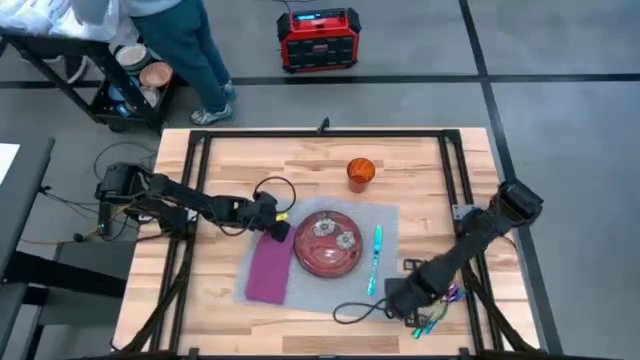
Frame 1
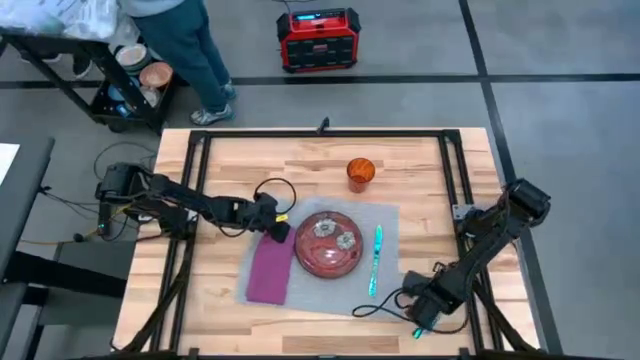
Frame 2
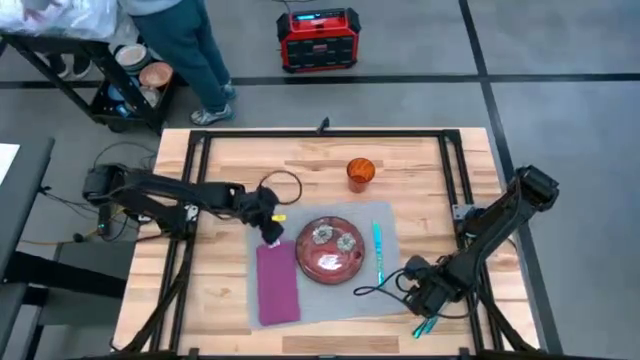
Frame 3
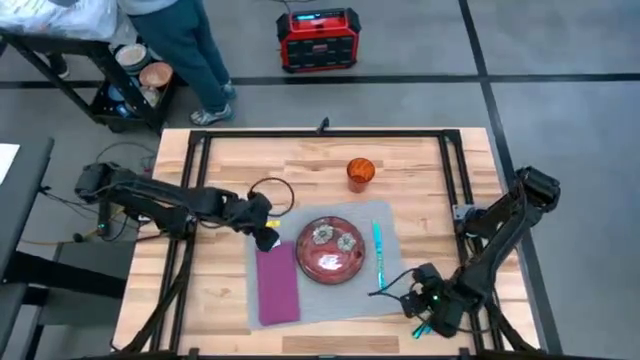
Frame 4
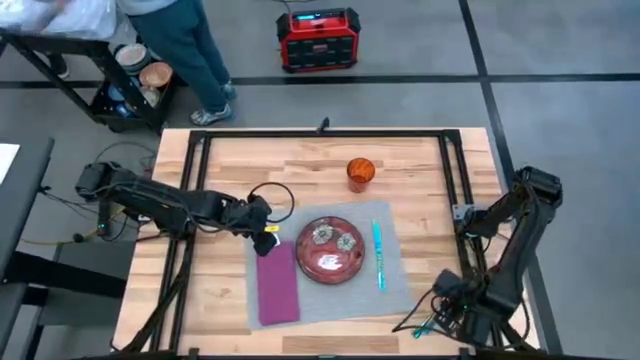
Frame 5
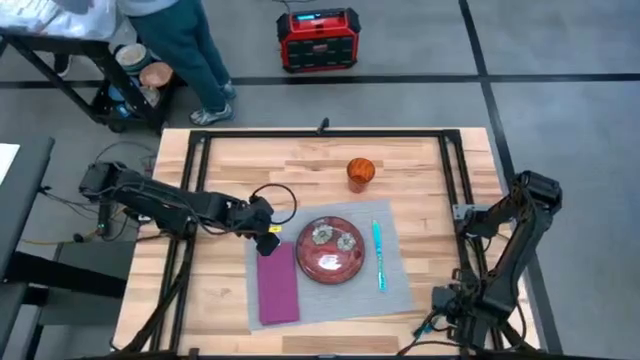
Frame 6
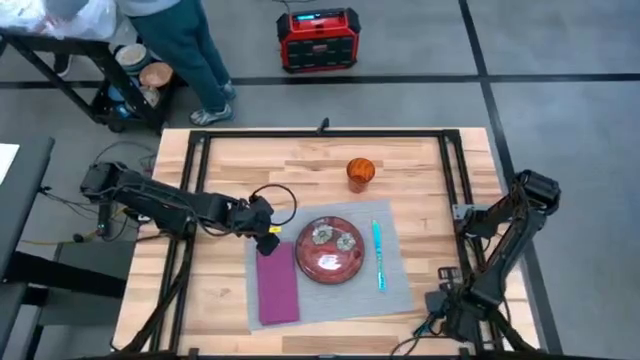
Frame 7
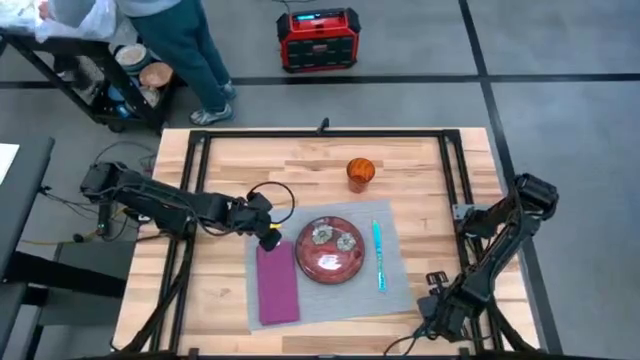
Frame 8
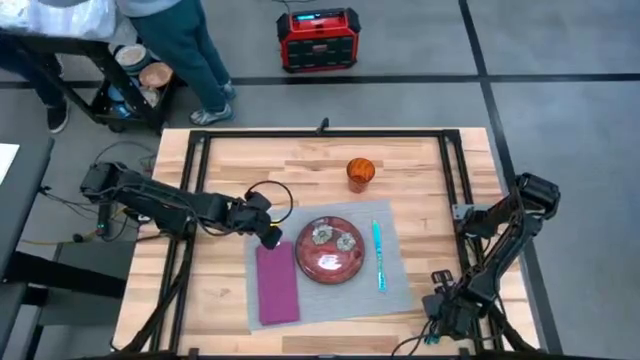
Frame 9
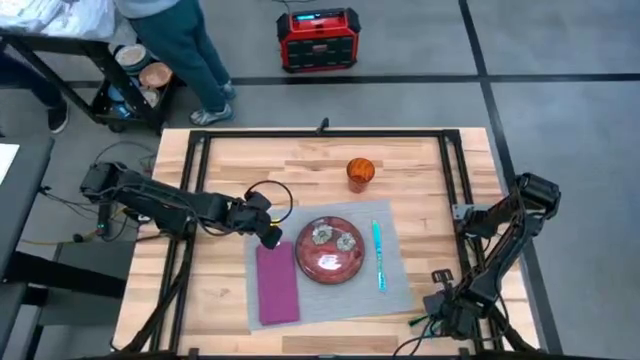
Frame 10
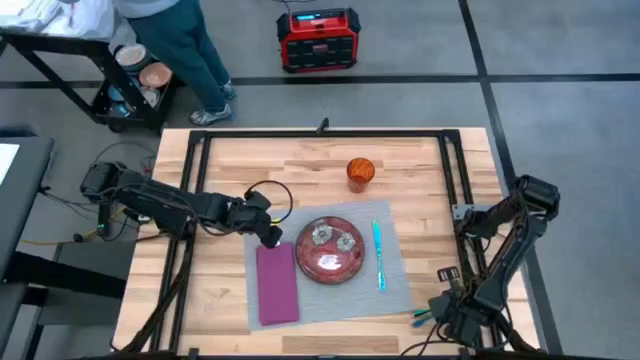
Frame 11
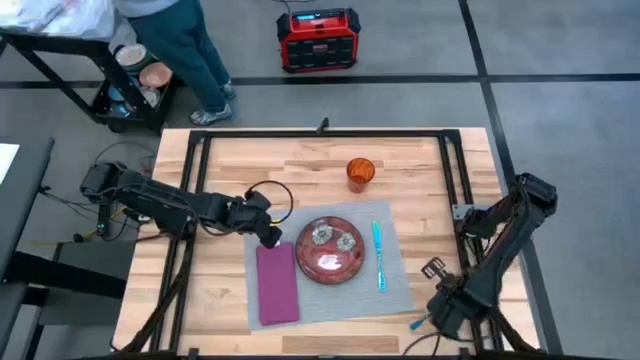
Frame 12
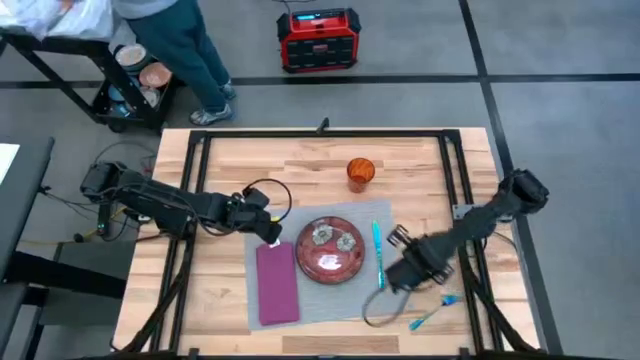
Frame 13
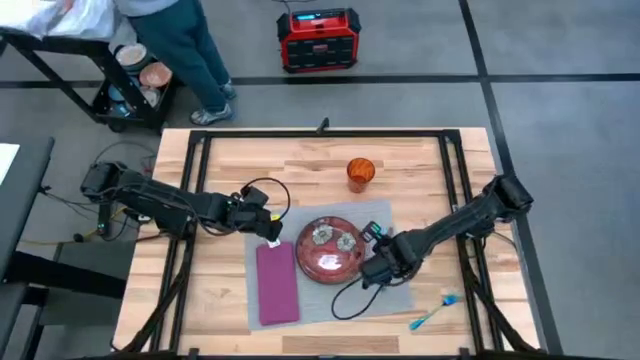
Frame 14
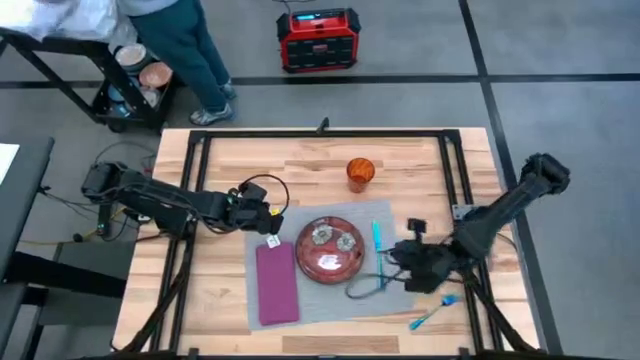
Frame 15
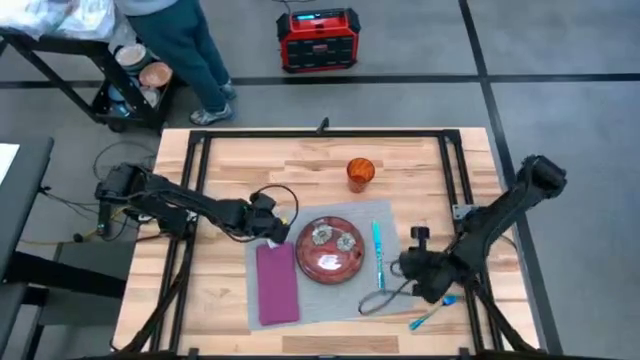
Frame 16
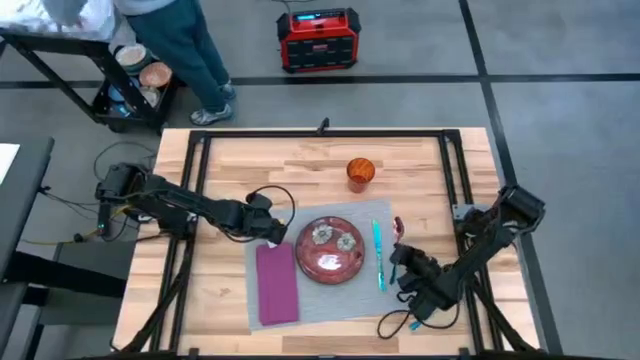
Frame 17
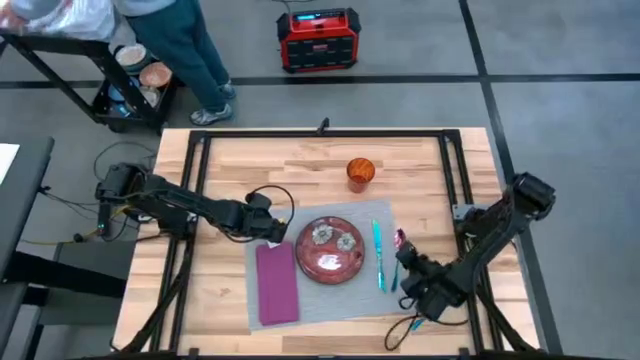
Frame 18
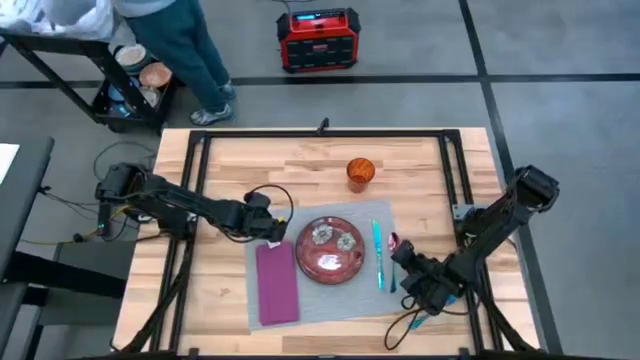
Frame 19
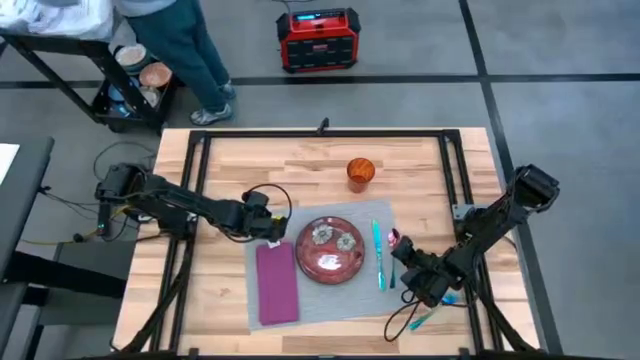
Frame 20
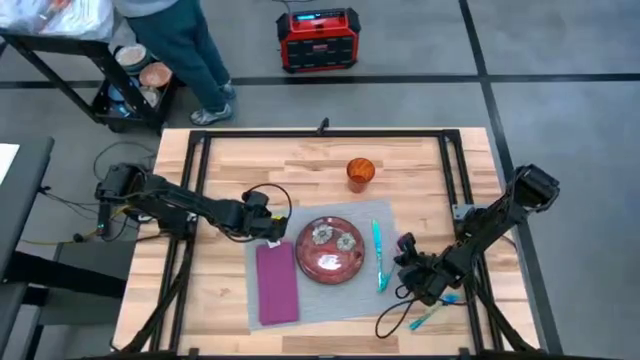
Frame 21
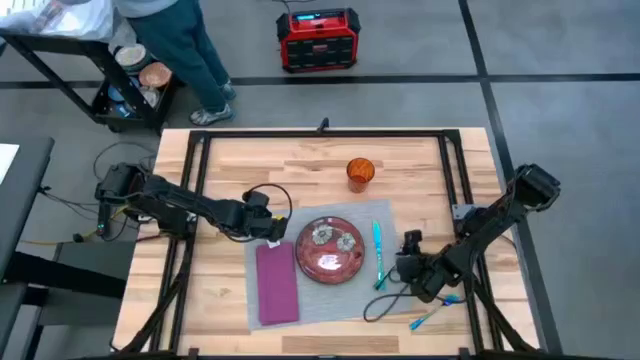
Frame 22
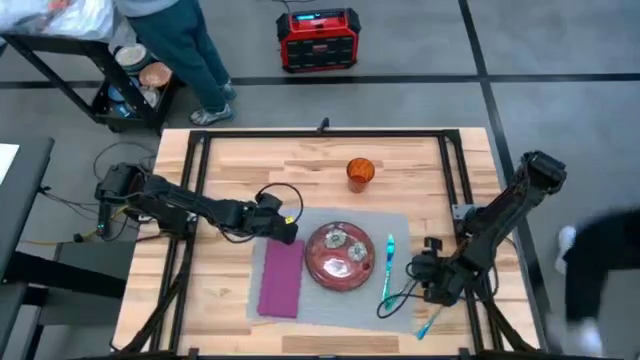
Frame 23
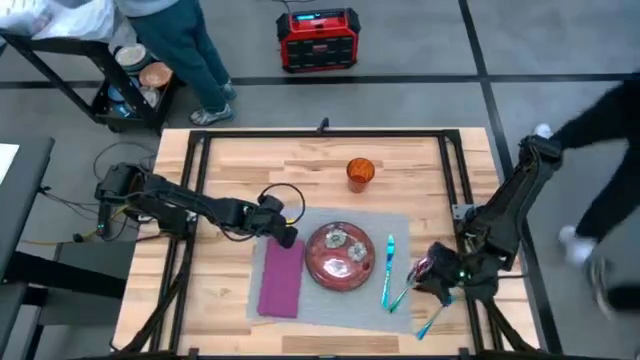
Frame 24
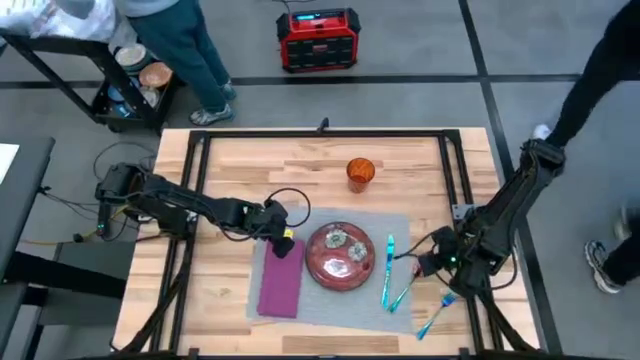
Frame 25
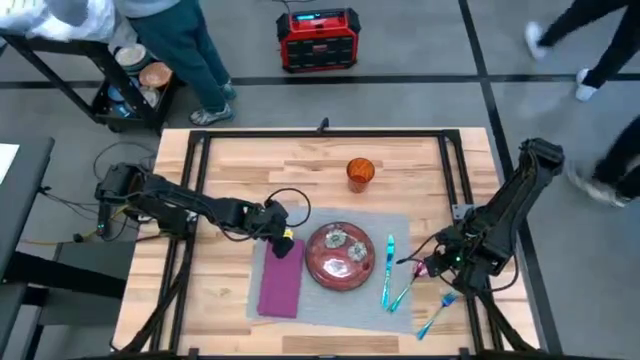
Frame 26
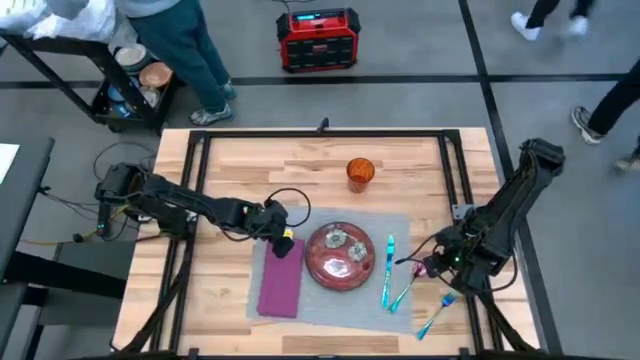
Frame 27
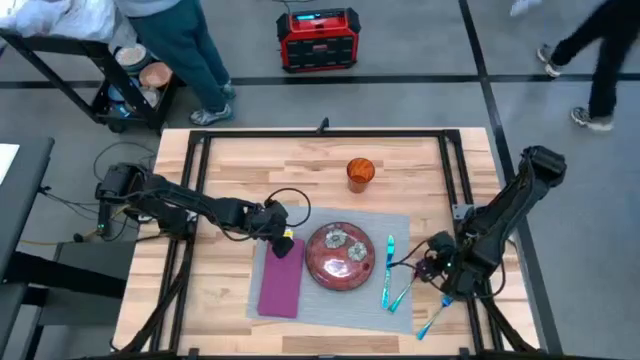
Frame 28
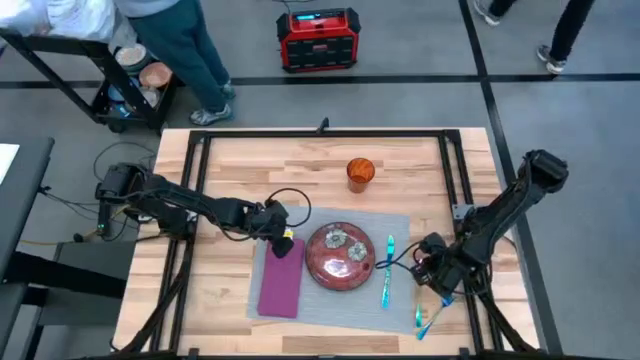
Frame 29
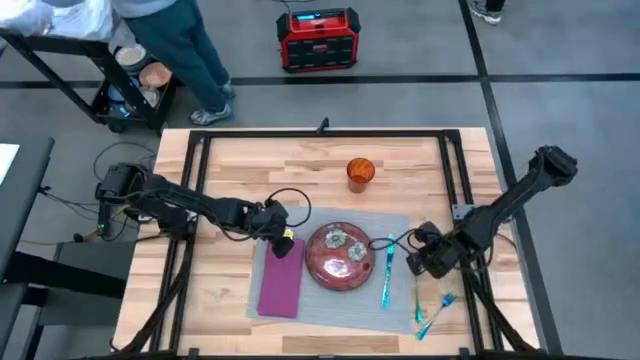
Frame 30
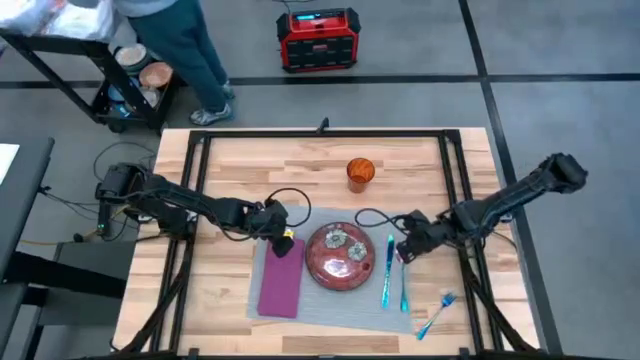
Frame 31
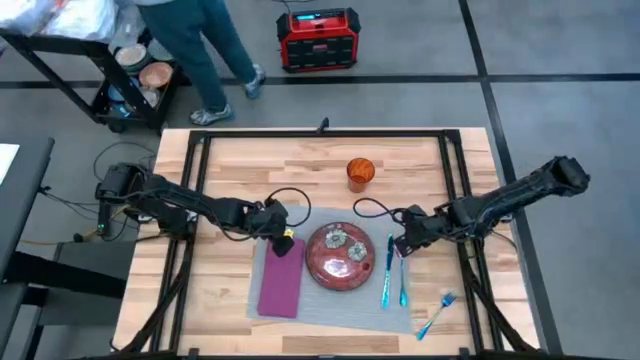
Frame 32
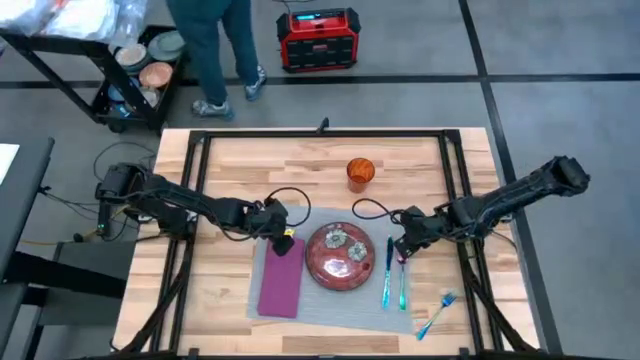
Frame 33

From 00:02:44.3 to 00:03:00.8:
Task: Set table place
Put the blue spoon on the table mat

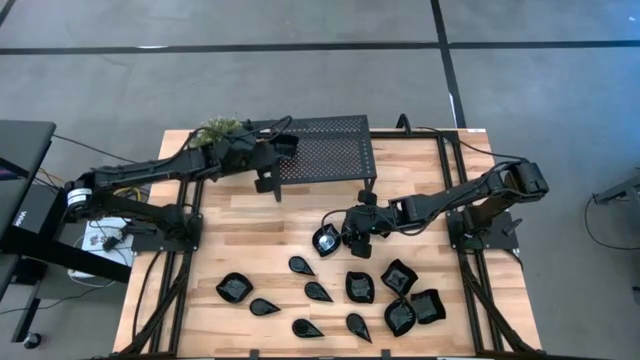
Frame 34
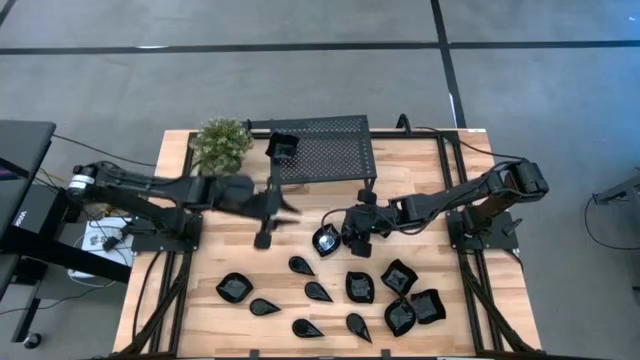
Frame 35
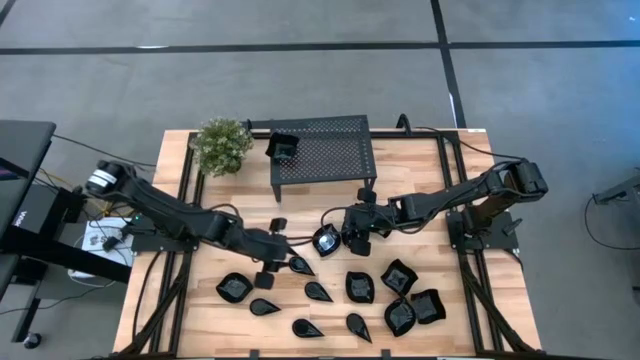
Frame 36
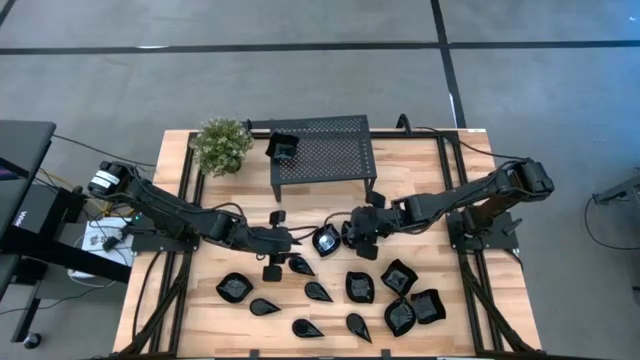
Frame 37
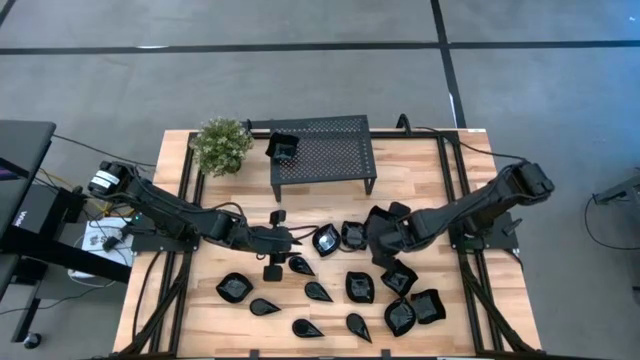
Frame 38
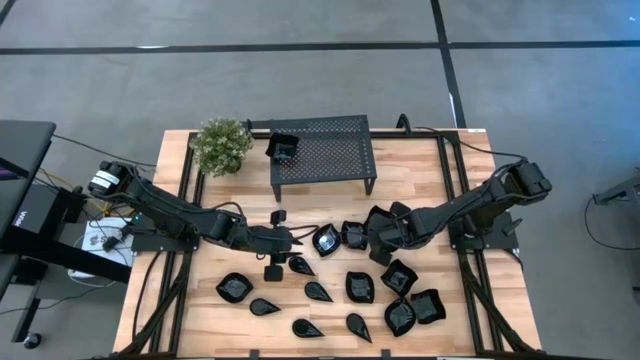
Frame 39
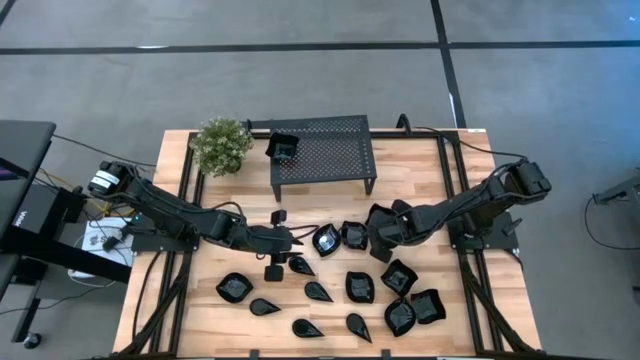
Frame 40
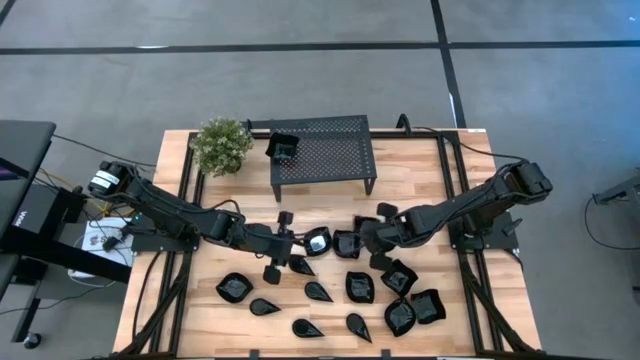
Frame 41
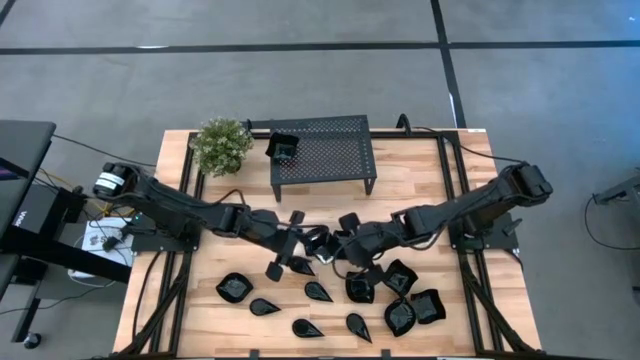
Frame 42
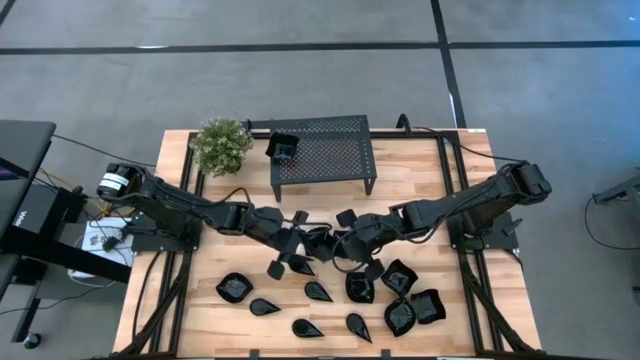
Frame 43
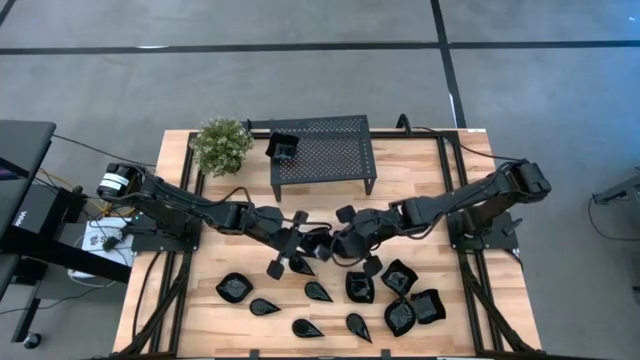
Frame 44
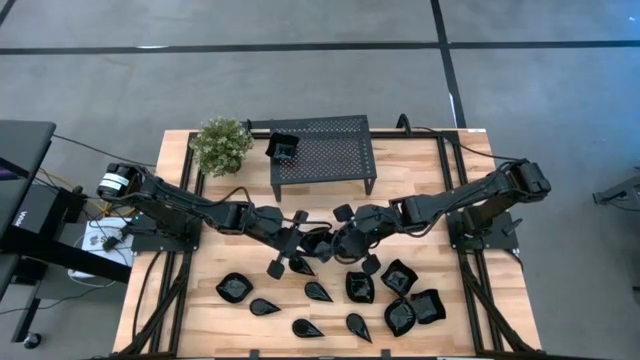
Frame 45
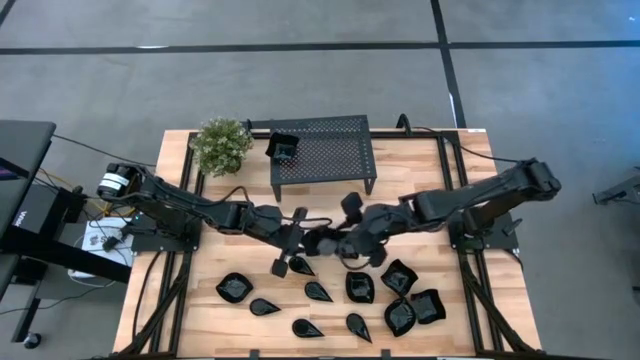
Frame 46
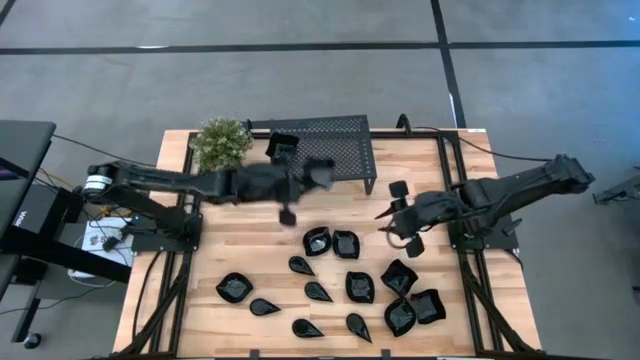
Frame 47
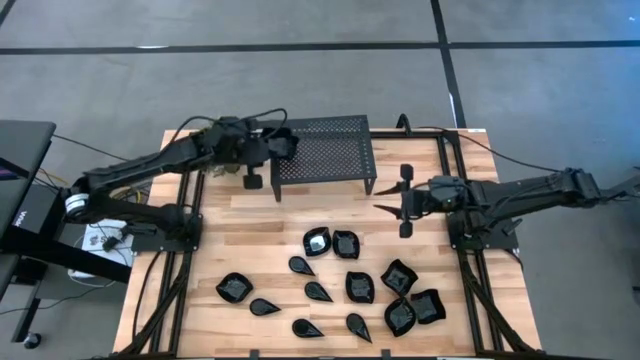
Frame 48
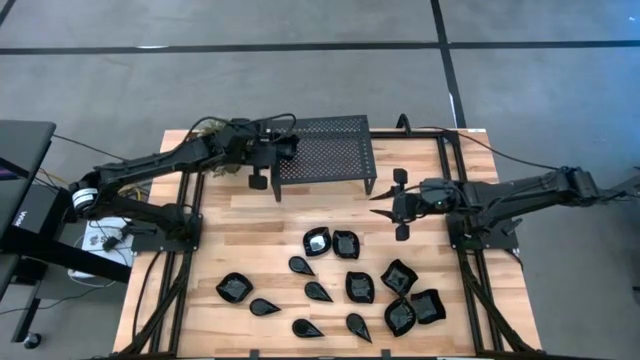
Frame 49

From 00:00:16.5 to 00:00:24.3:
Task: Pick & Place Mini shaped plates
Stack the distorted square plate on top of the distorted square plates on the shelf
